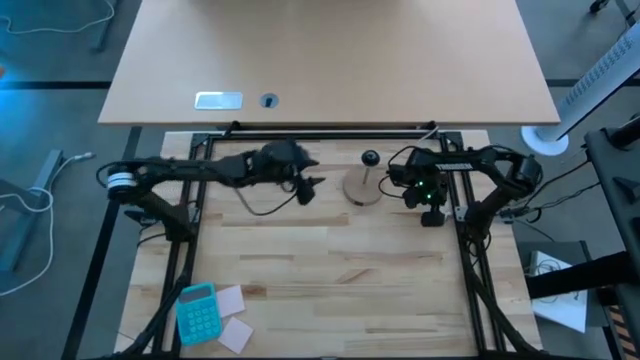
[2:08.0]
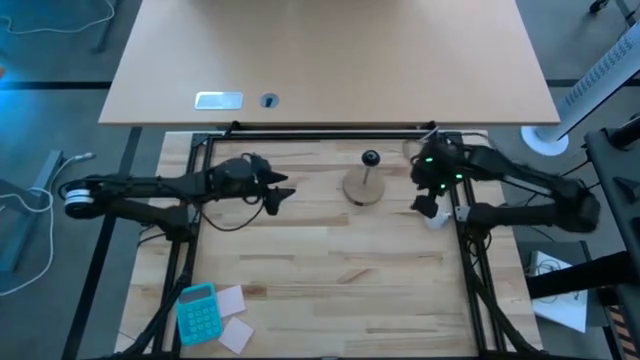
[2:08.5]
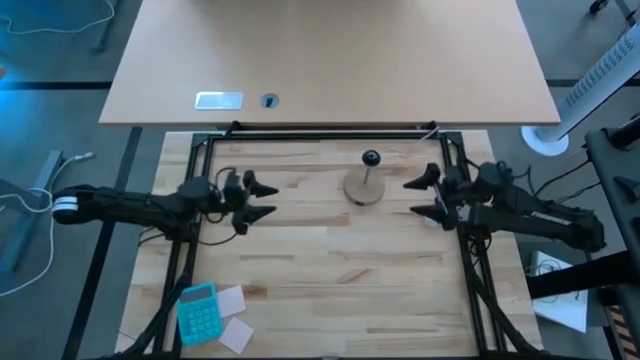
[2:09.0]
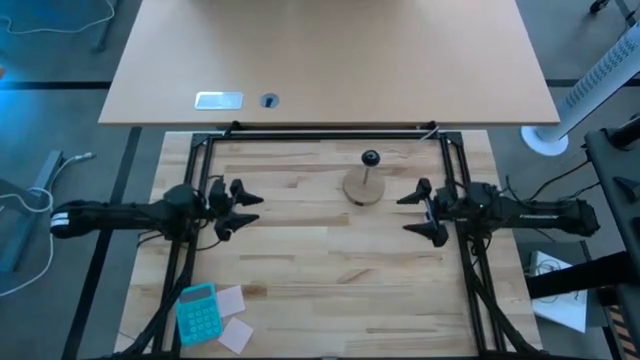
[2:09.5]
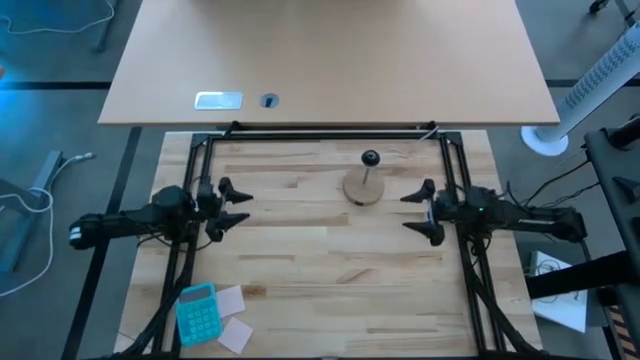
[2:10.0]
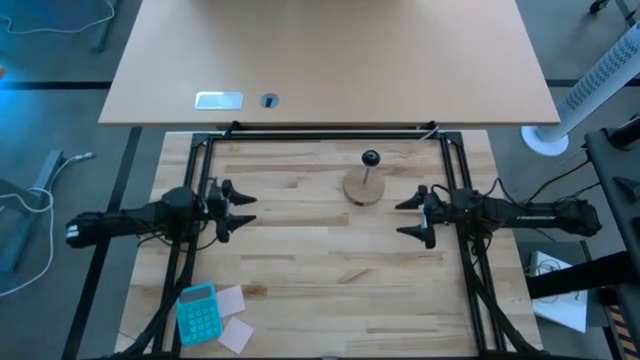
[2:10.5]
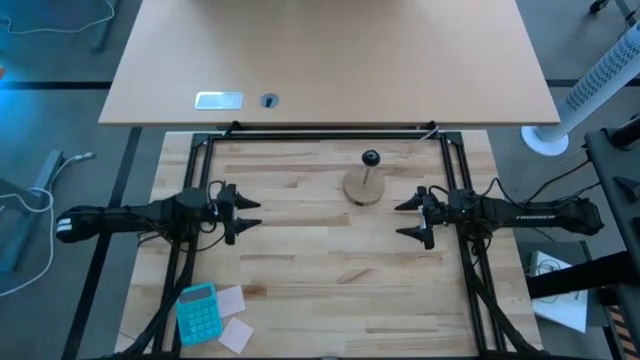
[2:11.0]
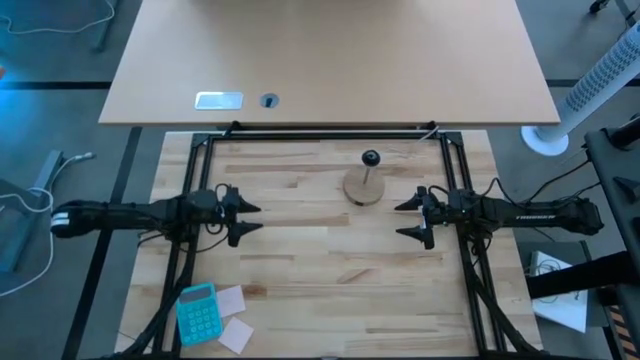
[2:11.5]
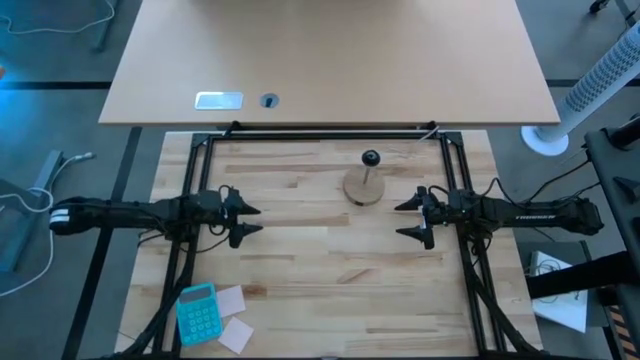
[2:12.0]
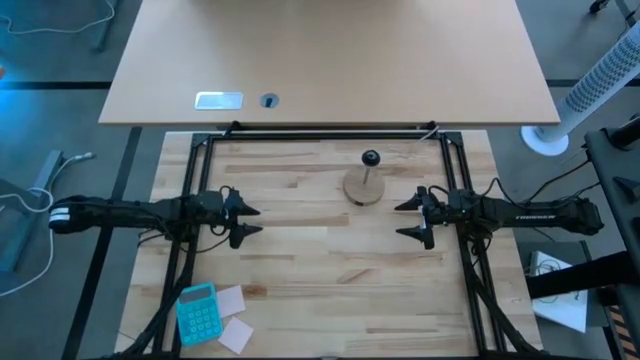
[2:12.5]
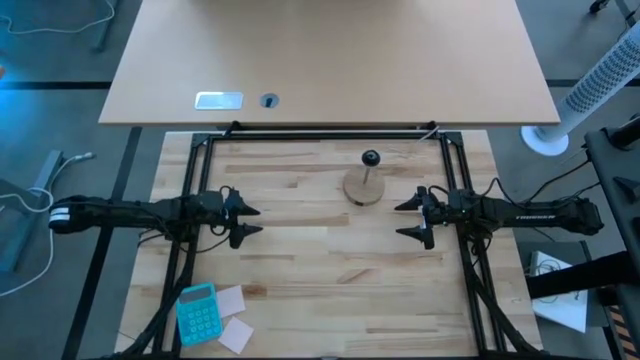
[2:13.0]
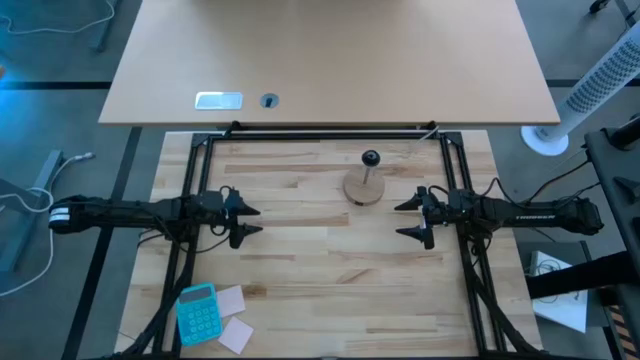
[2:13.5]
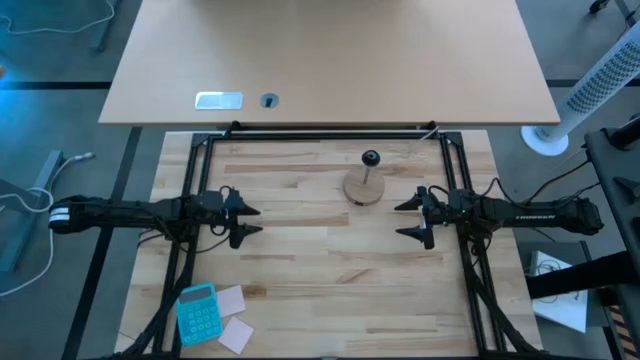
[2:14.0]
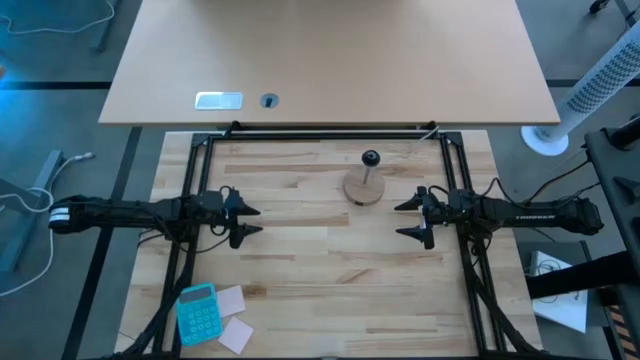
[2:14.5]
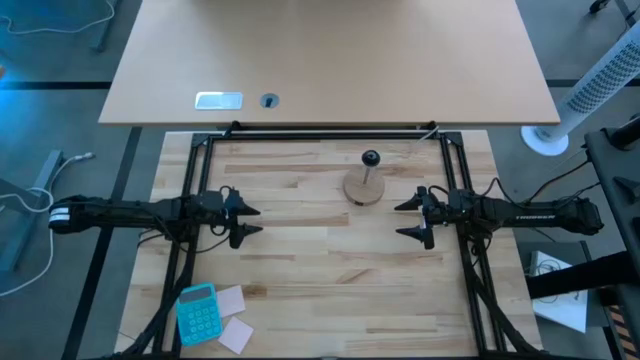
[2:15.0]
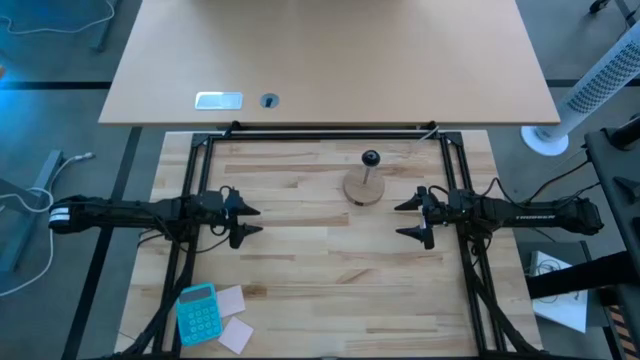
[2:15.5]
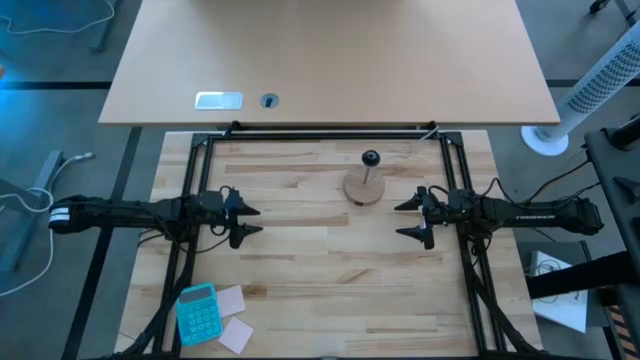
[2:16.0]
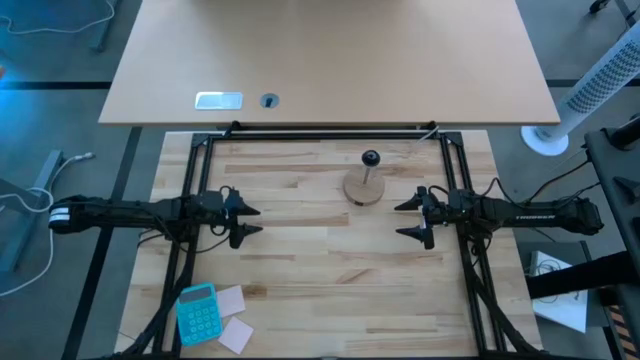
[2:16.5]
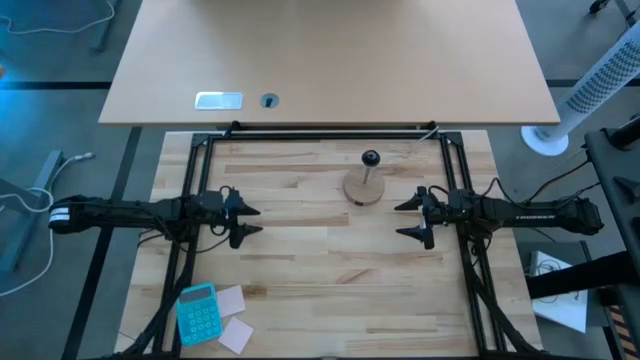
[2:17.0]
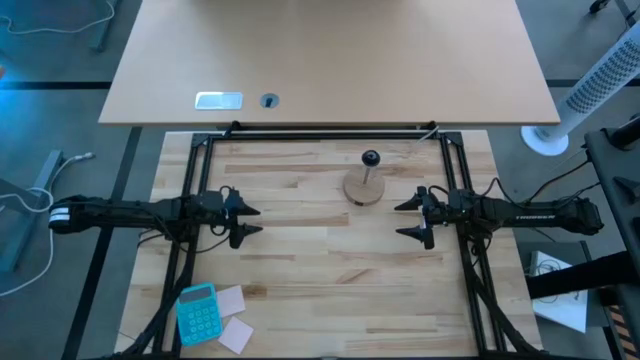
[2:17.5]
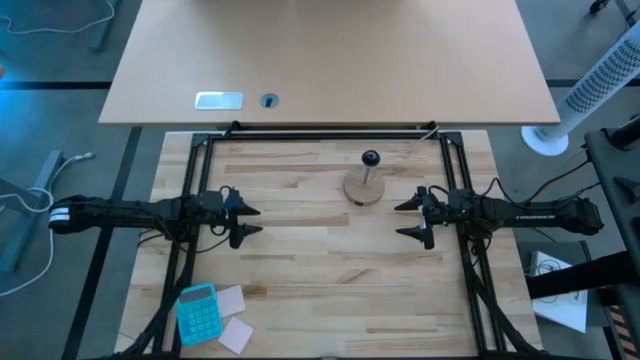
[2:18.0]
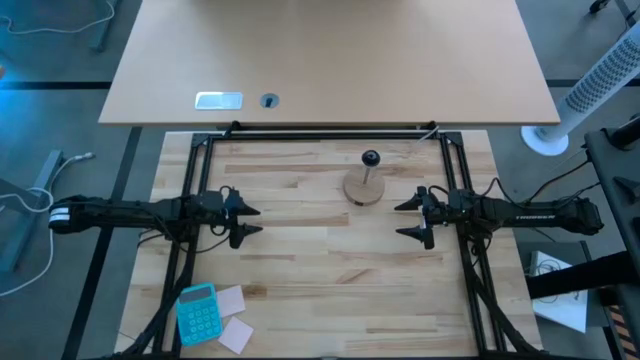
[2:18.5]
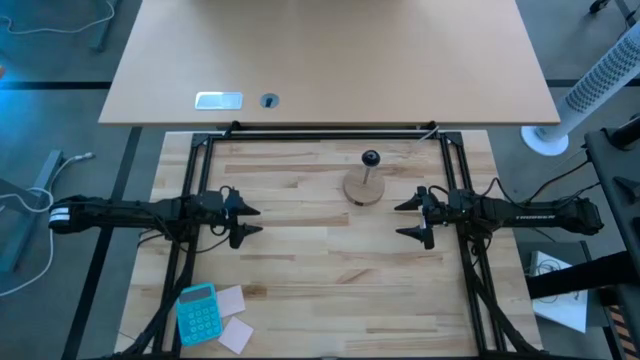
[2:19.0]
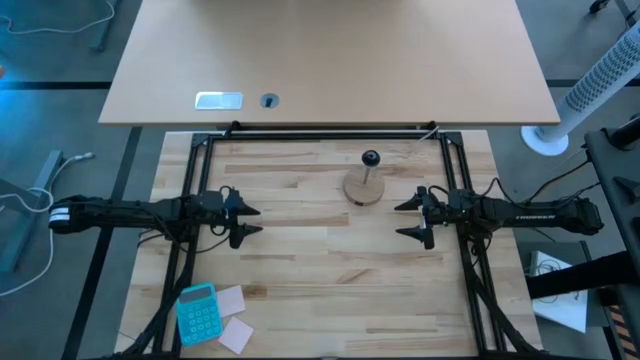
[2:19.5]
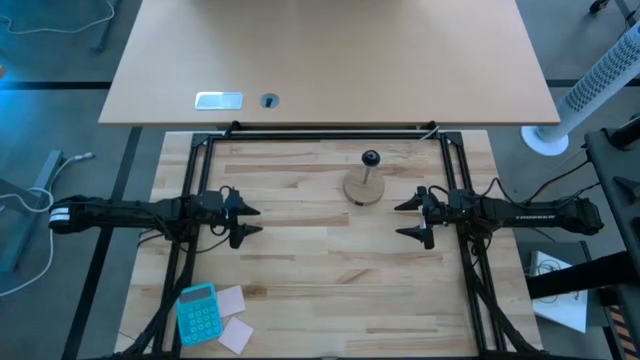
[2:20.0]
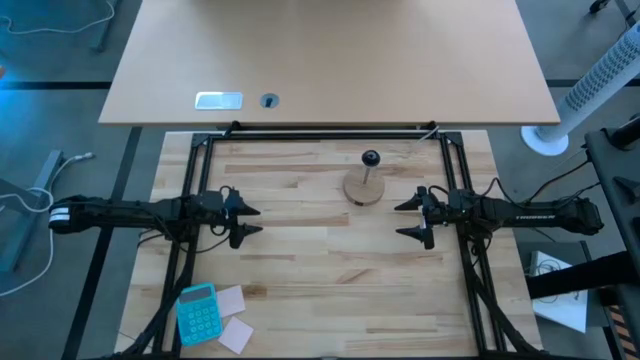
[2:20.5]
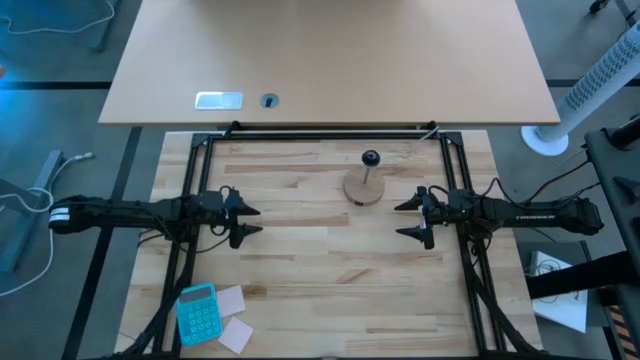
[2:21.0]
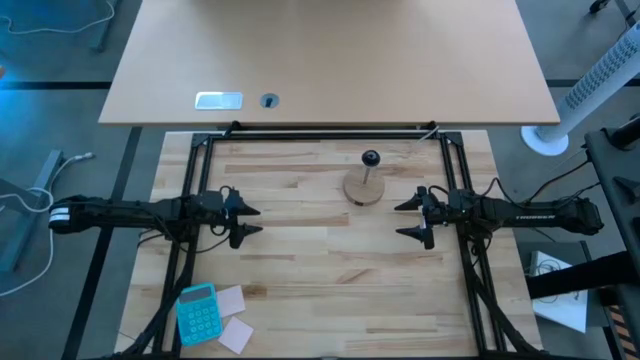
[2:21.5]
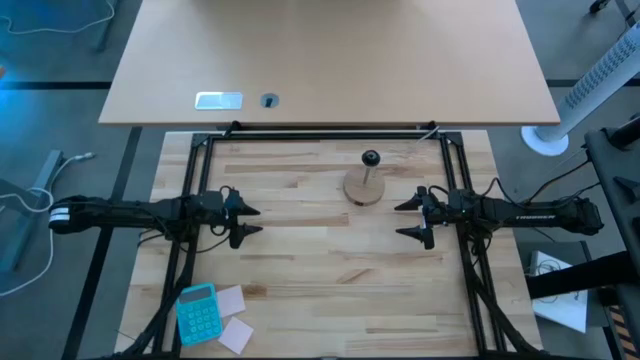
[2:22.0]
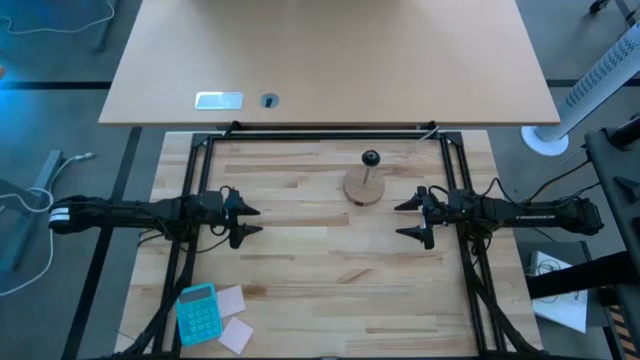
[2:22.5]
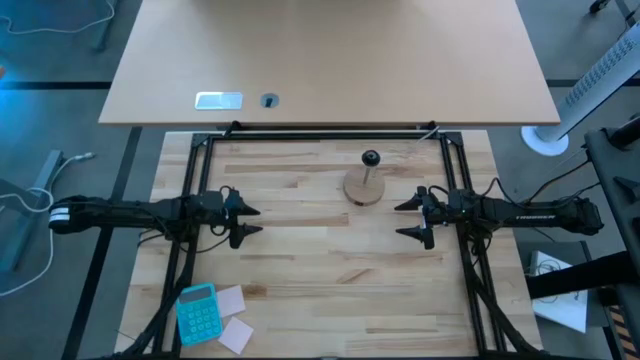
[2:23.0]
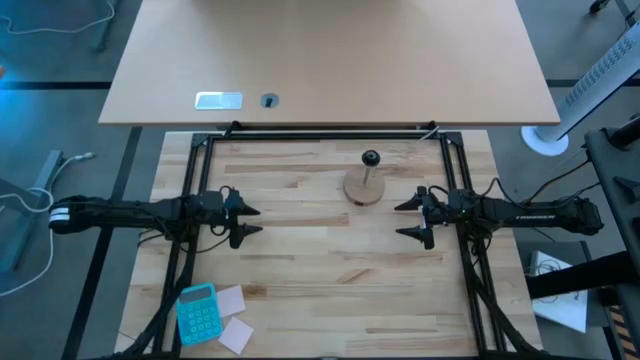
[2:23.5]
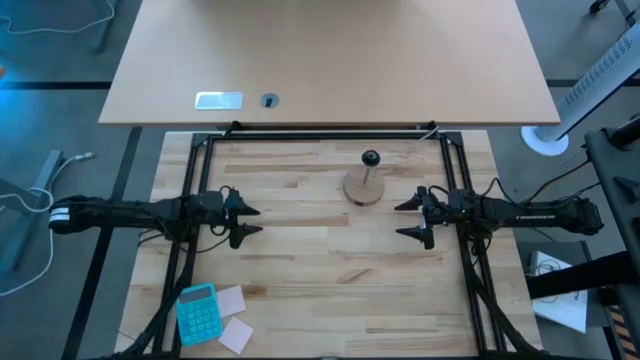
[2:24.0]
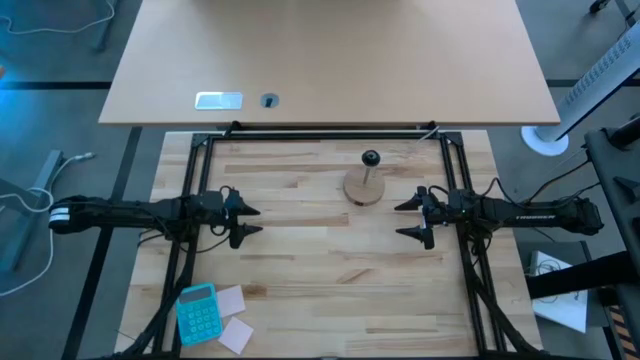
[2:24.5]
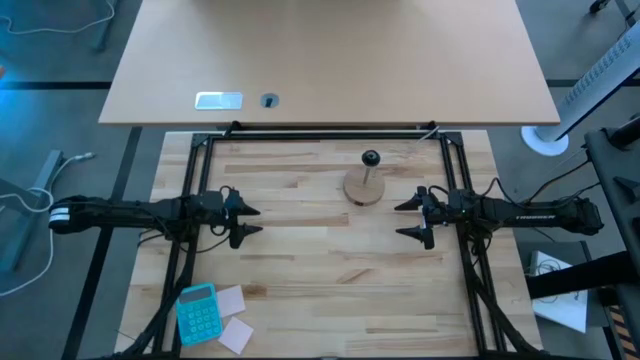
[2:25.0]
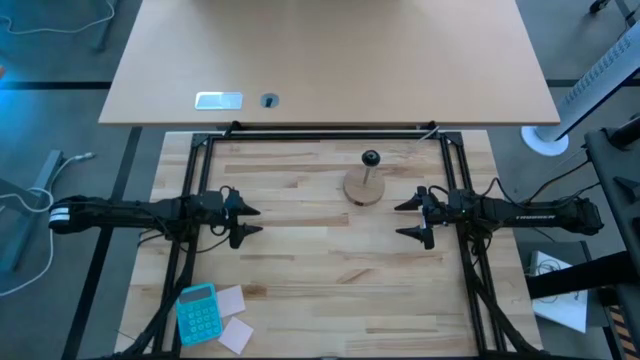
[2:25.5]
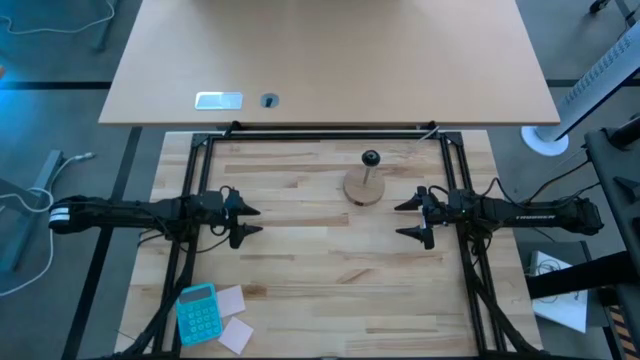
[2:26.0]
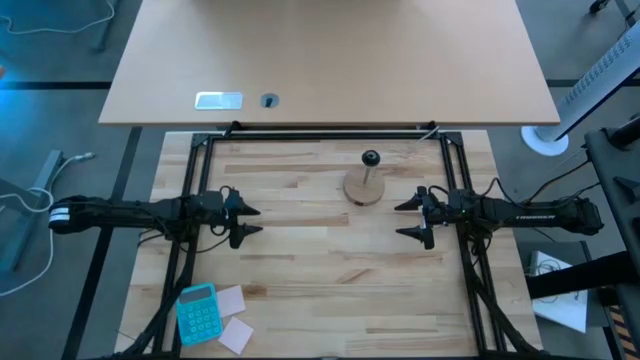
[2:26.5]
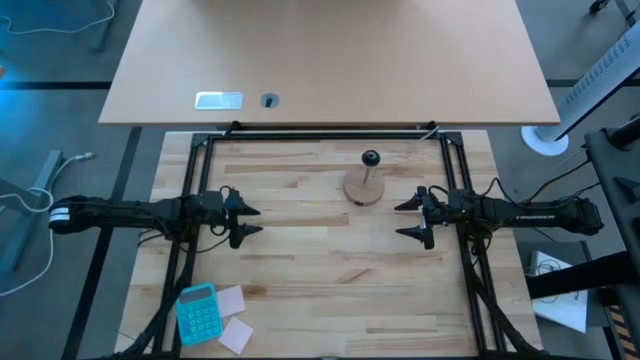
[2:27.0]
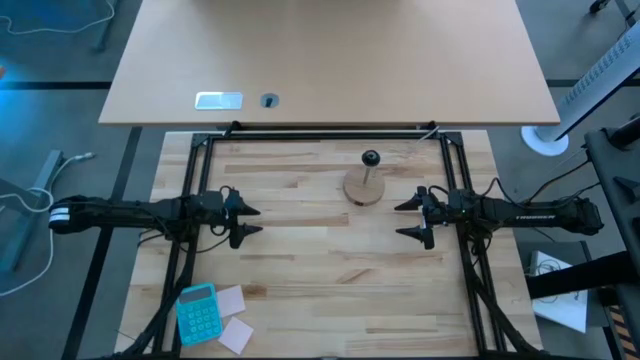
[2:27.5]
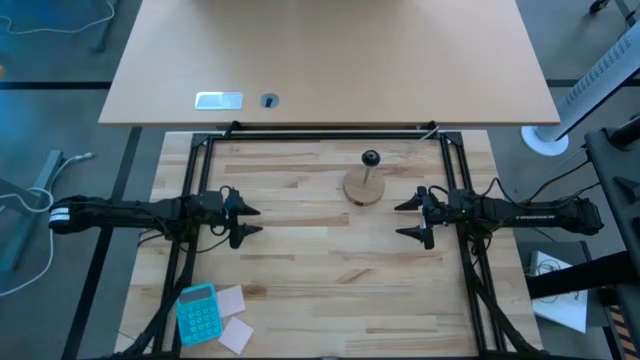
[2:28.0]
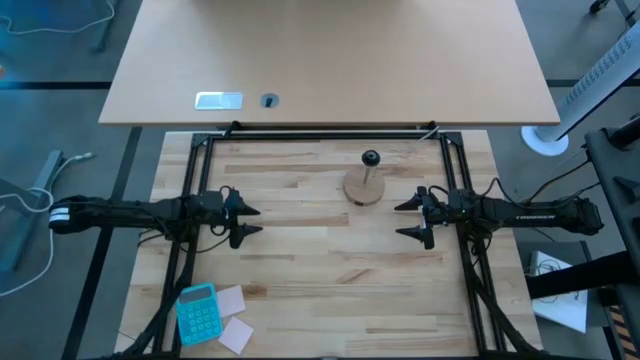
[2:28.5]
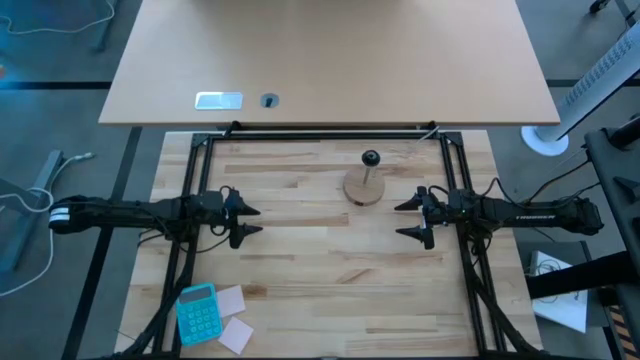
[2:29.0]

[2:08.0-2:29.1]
Task: Screw lightbulb
Return to Home Position
